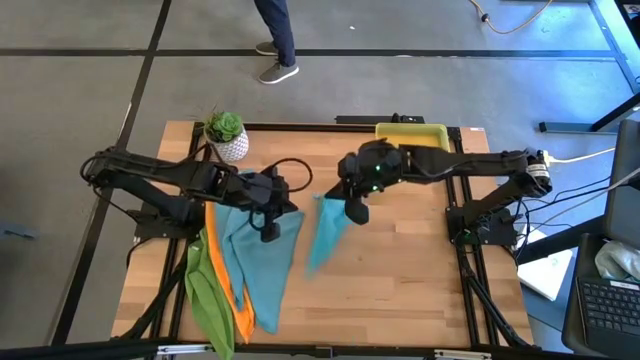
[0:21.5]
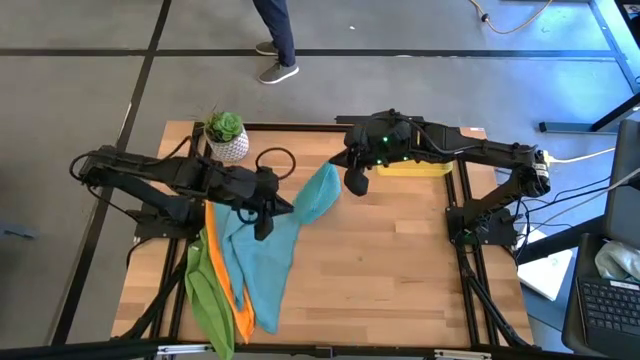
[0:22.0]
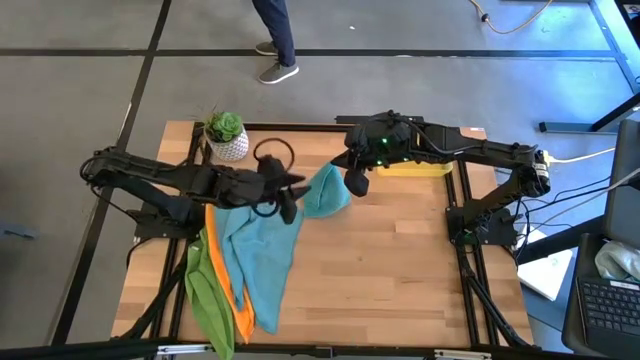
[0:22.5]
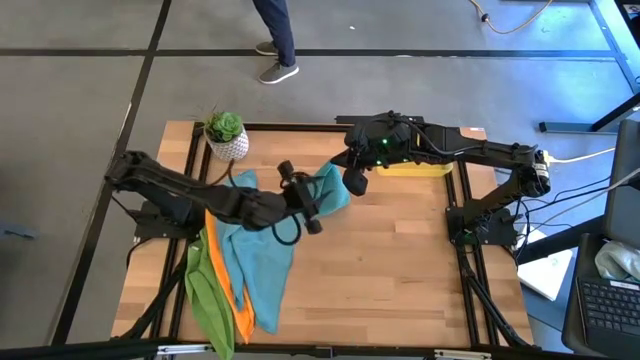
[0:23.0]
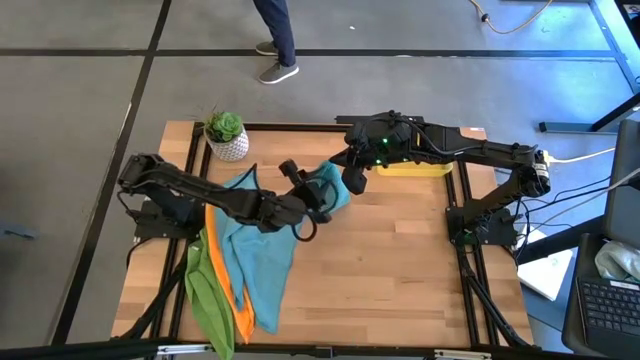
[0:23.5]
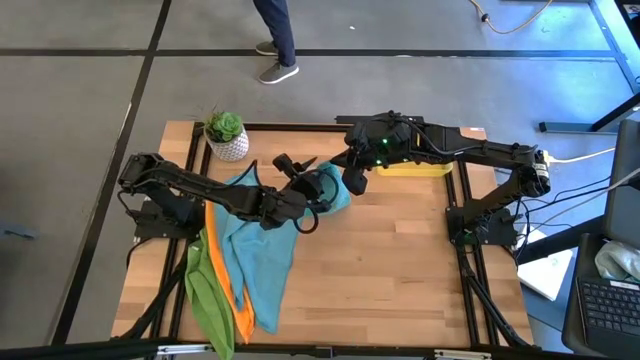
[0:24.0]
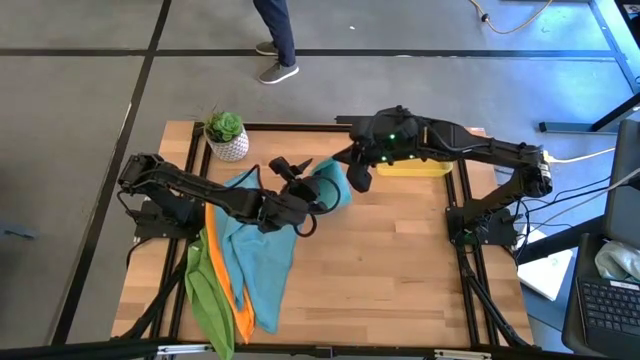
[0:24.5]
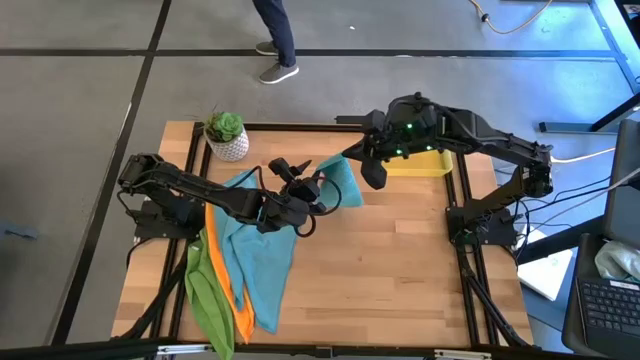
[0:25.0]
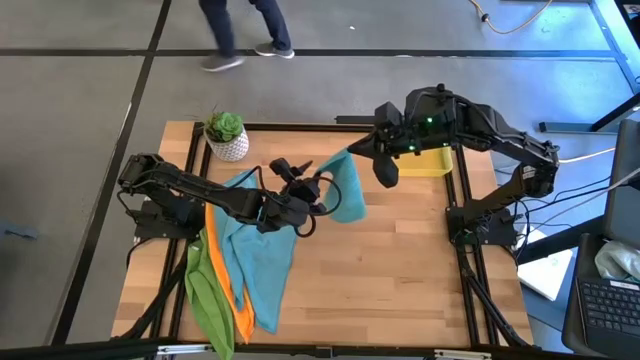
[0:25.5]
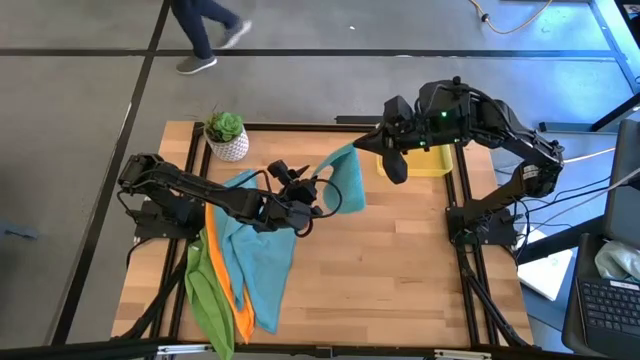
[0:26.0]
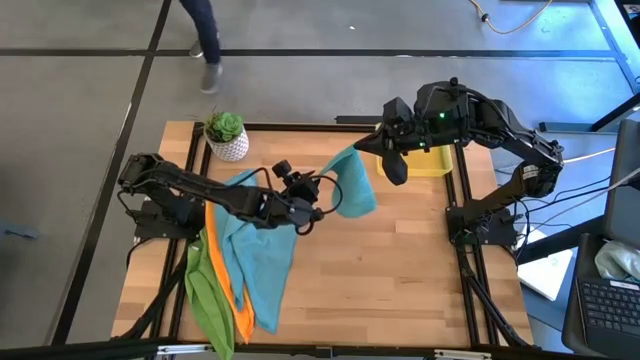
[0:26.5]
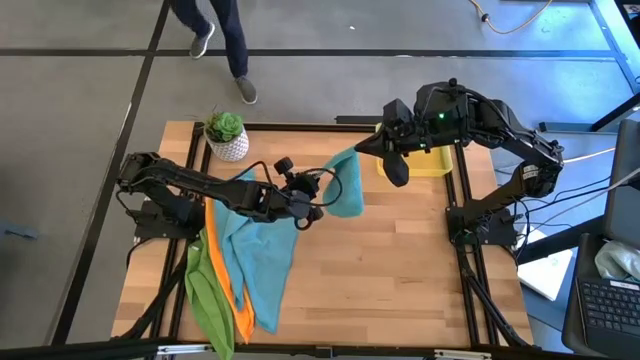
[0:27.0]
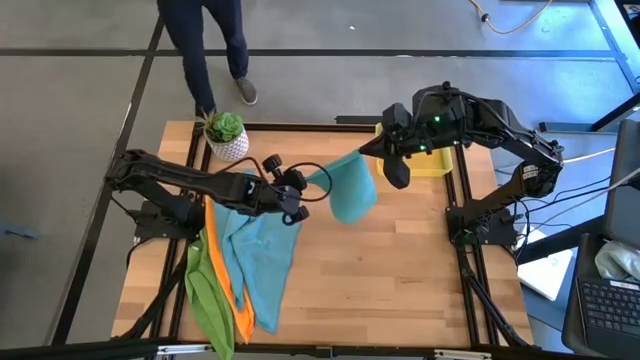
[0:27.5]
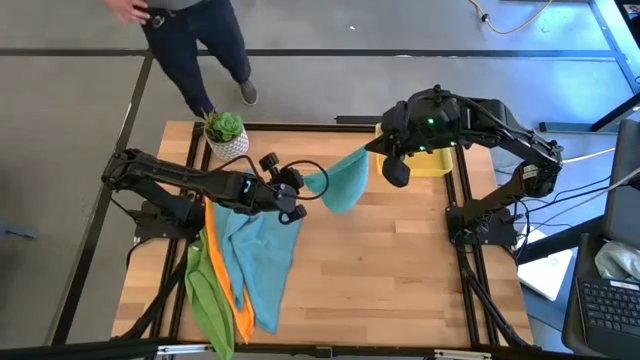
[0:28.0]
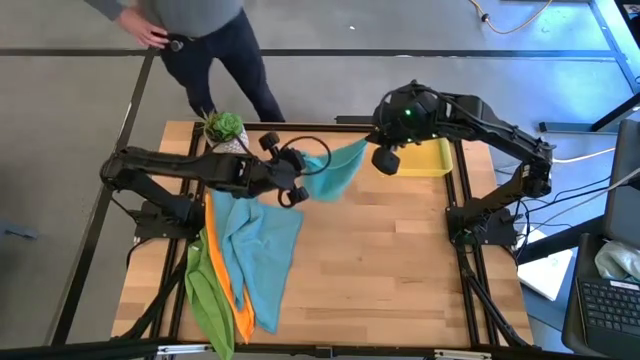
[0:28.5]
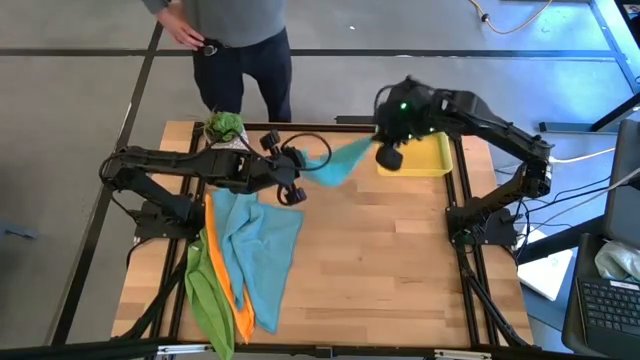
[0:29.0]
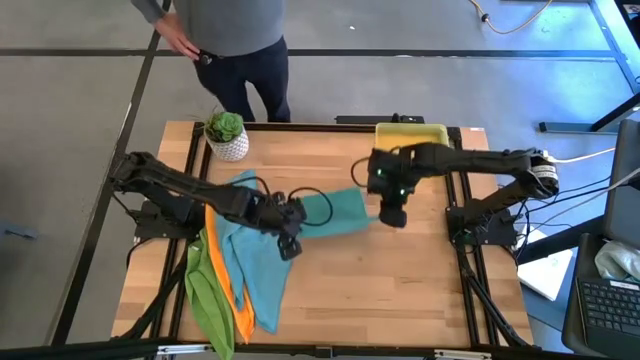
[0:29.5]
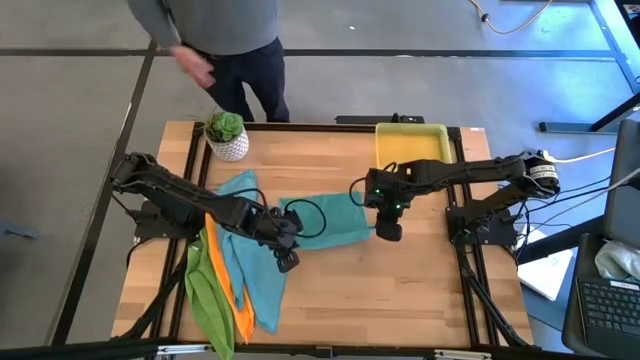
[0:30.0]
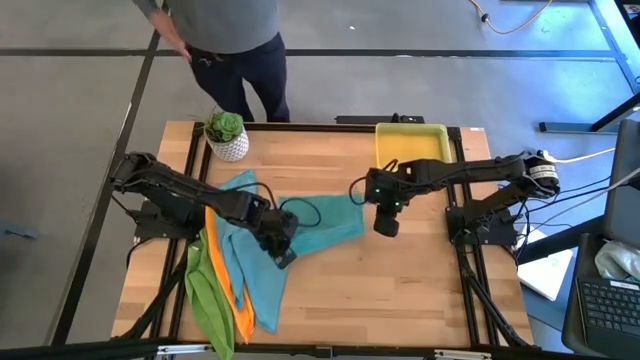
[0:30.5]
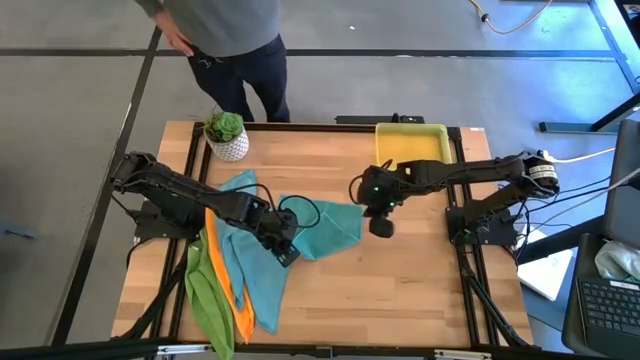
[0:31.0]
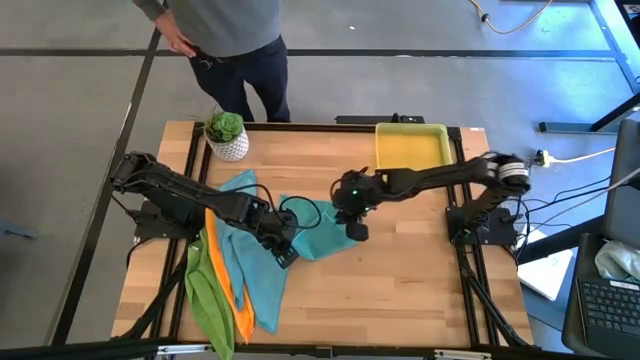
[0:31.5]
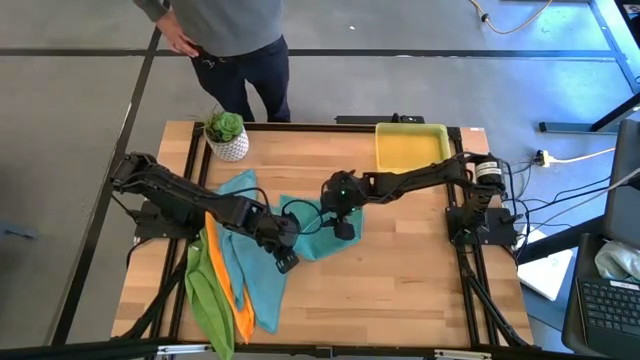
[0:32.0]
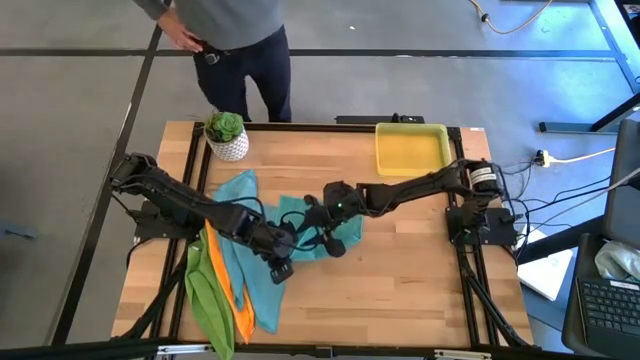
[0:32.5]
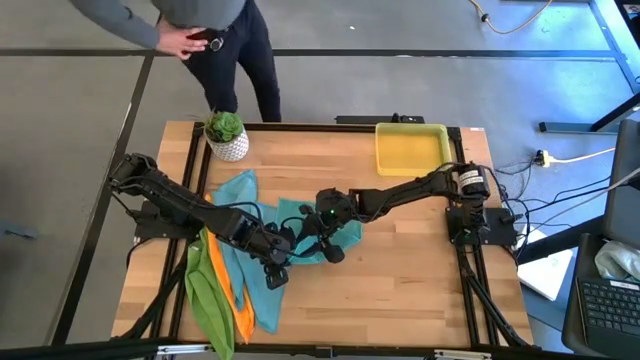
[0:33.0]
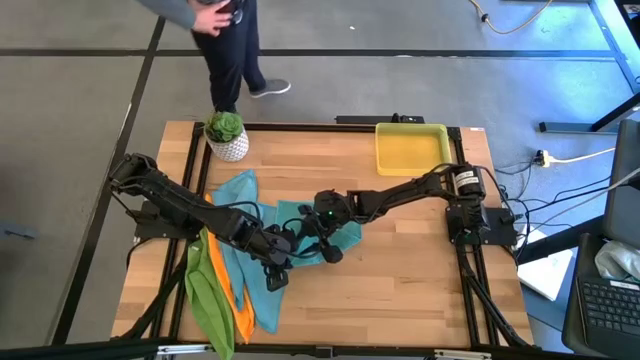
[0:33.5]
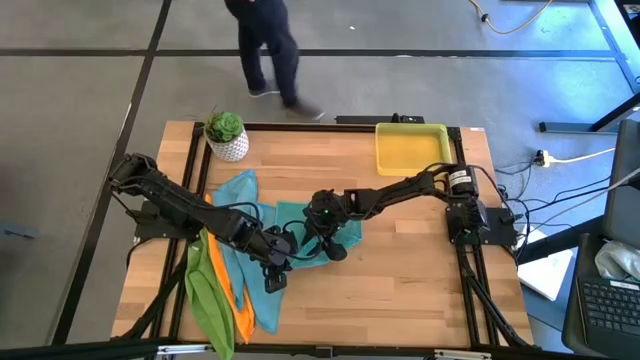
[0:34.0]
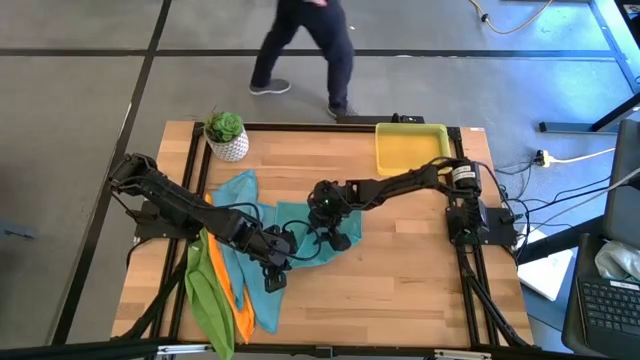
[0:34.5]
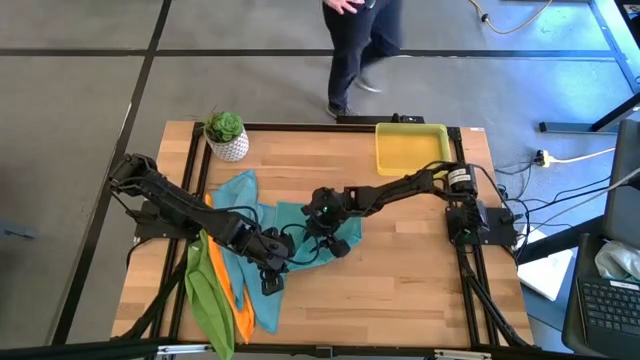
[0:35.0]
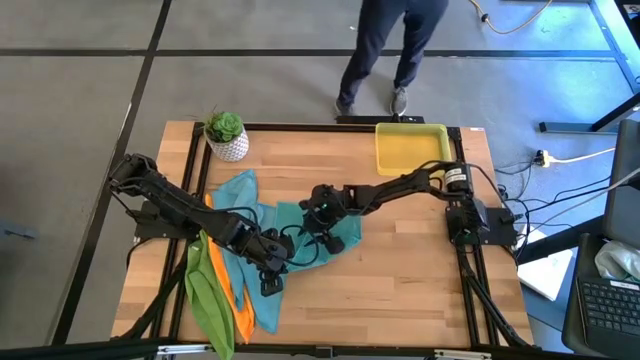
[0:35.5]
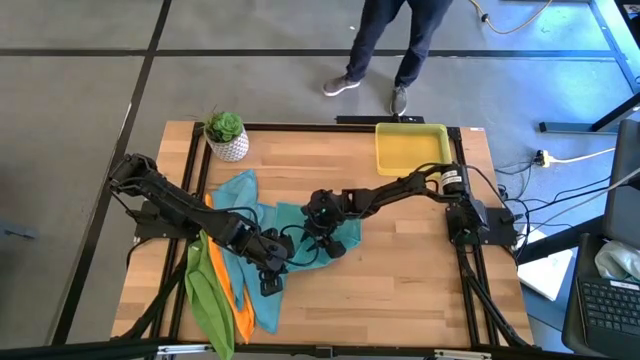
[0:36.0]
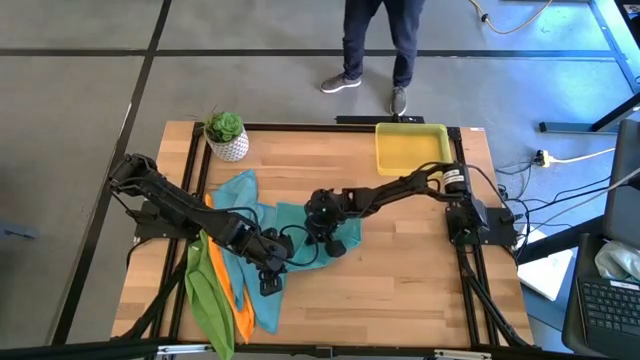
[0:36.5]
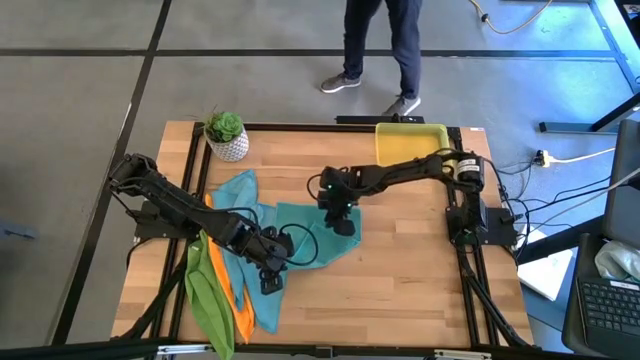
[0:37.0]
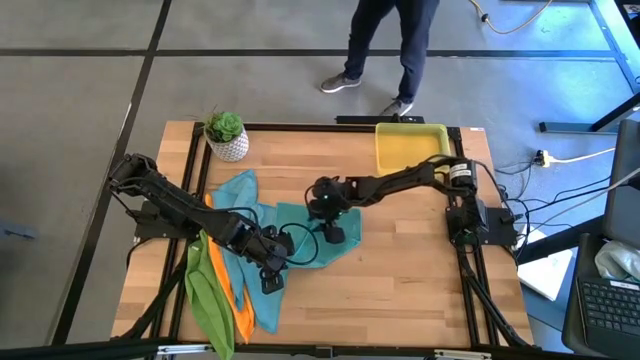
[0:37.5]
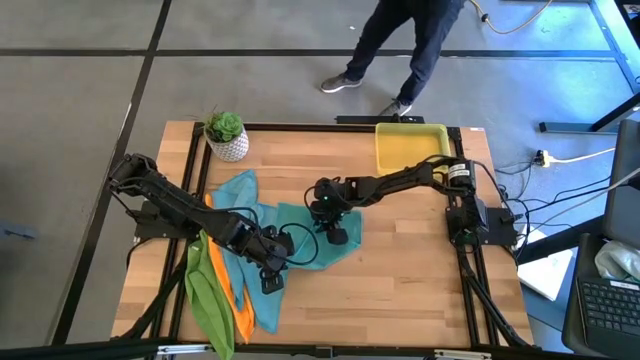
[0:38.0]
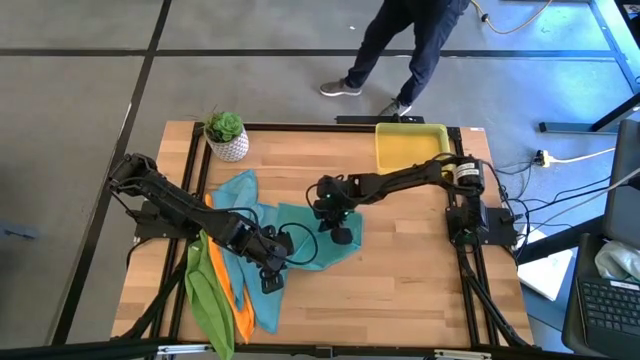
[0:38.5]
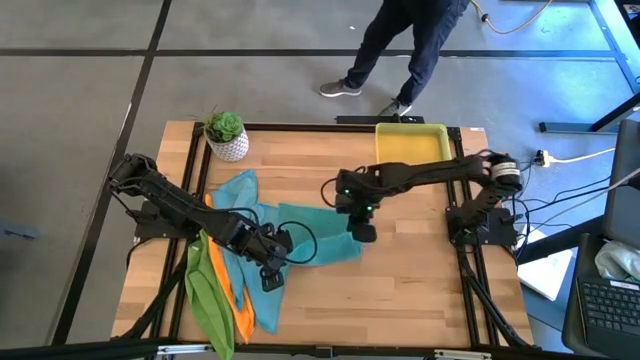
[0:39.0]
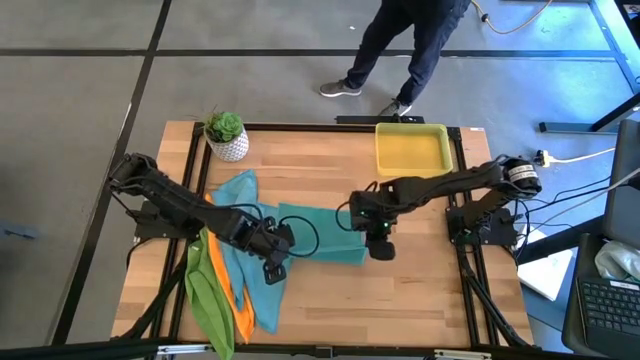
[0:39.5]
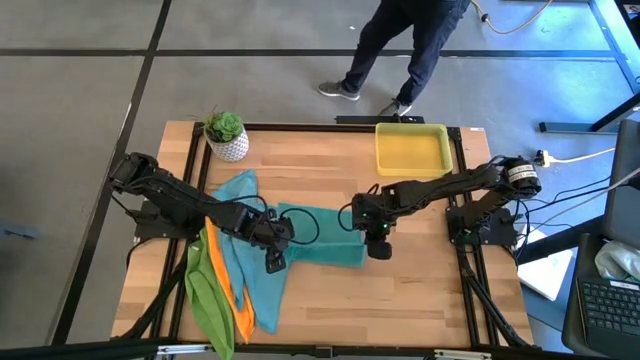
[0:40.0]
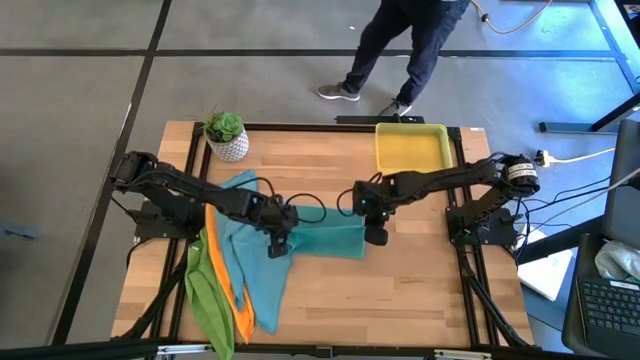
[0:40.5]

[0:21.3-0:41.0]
Task: Fold microfiber towels
Fold the right blue microfiber towel

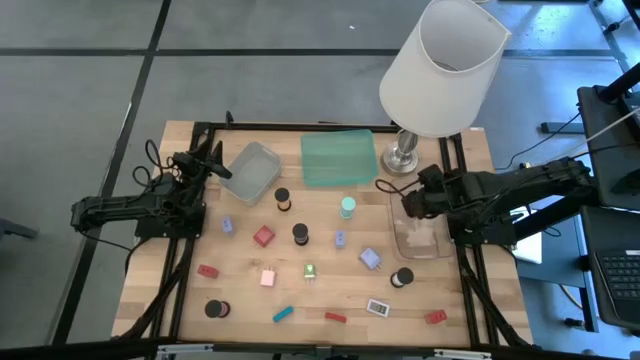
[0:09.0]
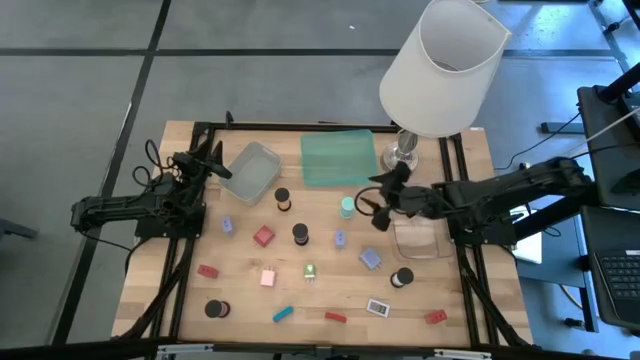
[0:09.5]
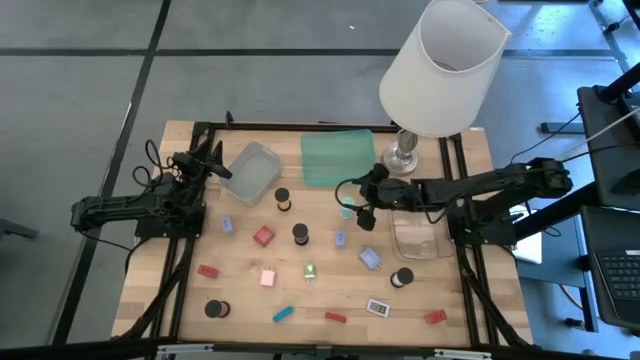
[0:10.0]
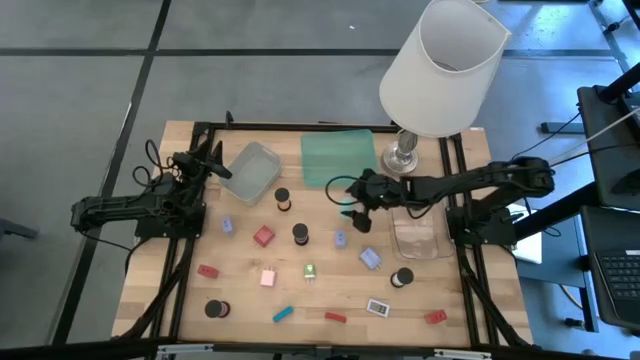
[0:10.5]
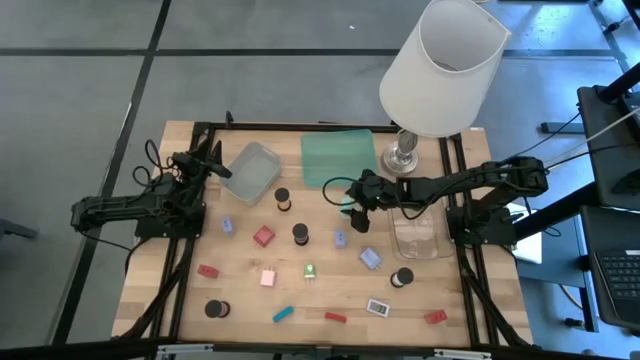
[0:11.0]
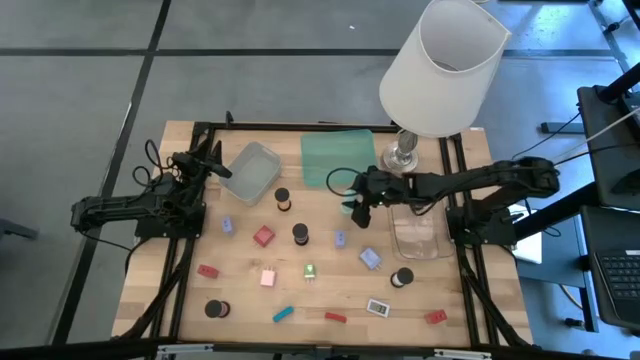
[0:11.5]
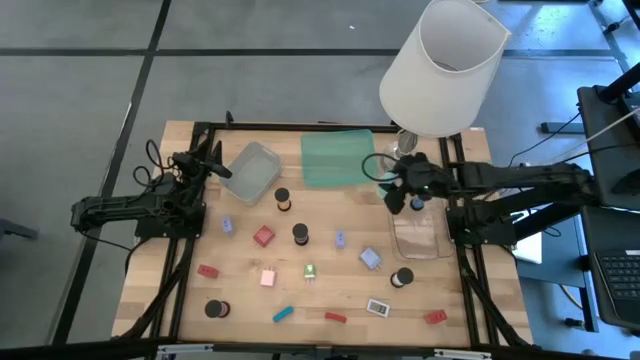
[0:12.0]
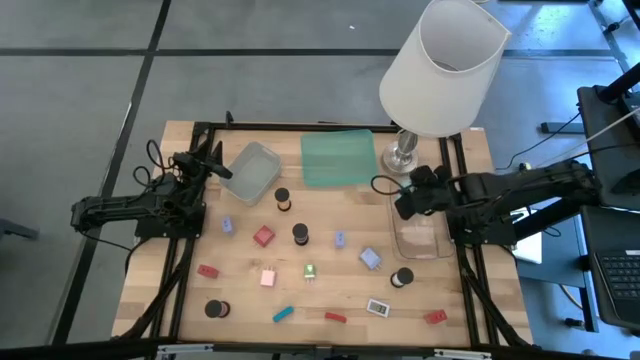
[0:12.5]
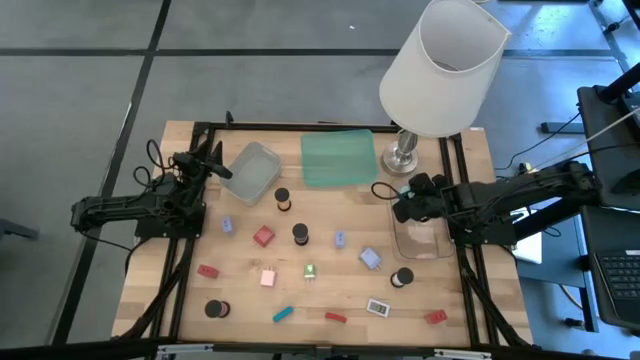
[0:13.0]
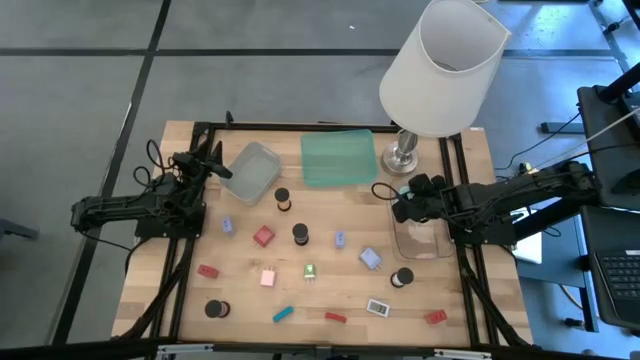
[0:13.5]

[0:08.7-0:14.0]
Task: Pick & Place Office items
Put the light blue hourglass into the transparent bin
